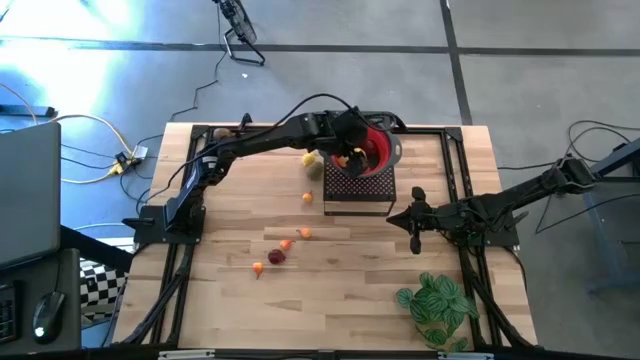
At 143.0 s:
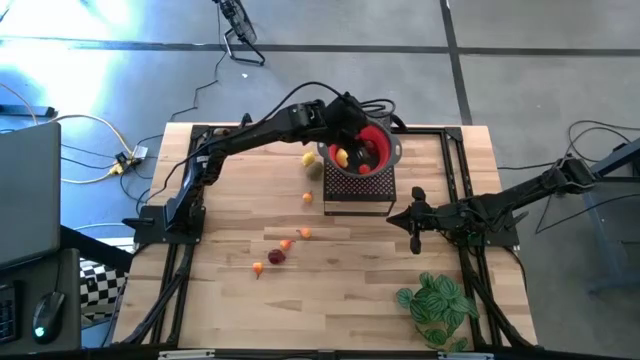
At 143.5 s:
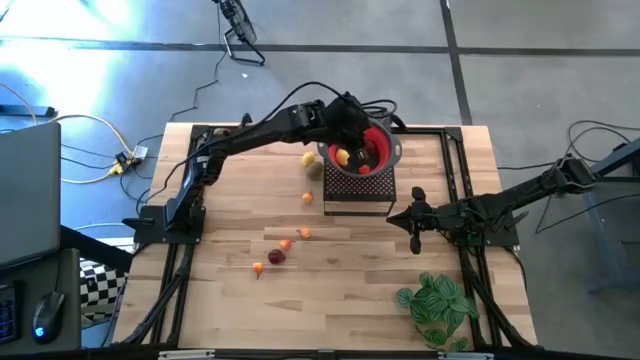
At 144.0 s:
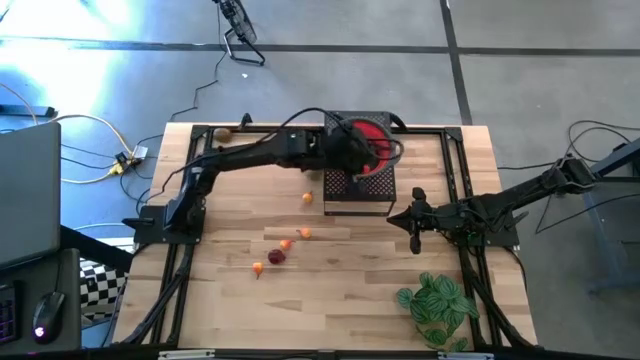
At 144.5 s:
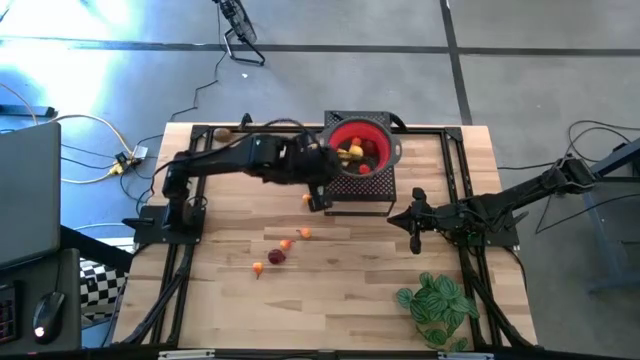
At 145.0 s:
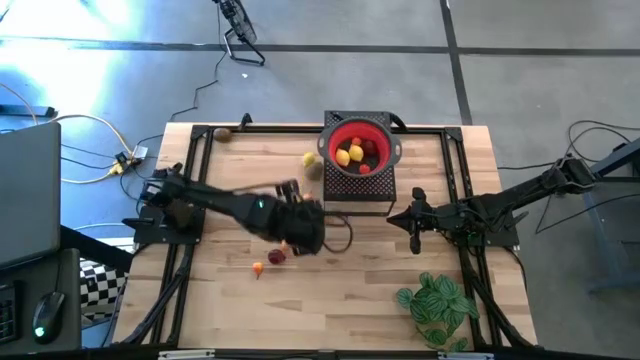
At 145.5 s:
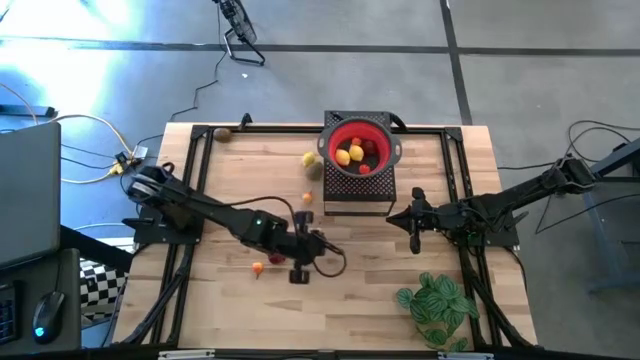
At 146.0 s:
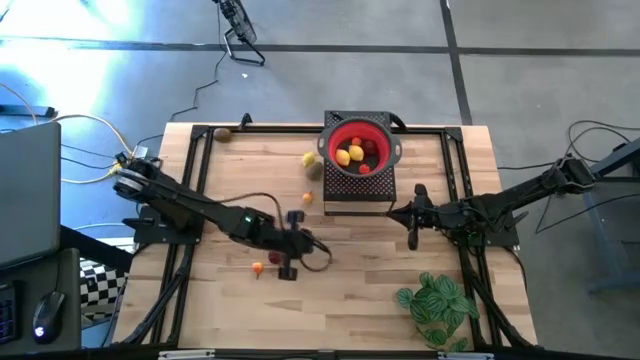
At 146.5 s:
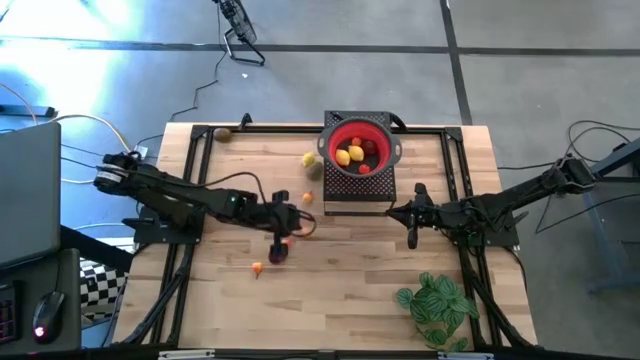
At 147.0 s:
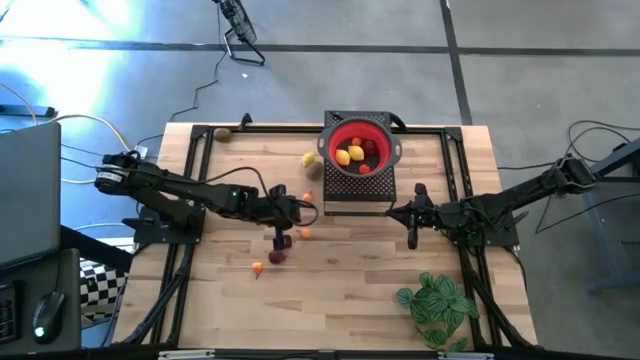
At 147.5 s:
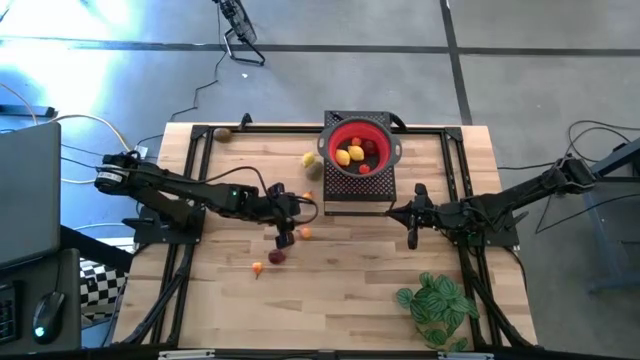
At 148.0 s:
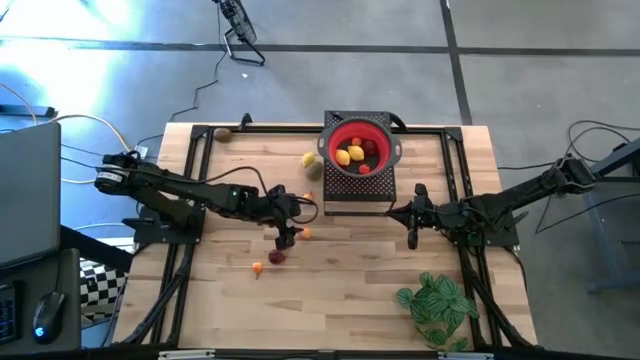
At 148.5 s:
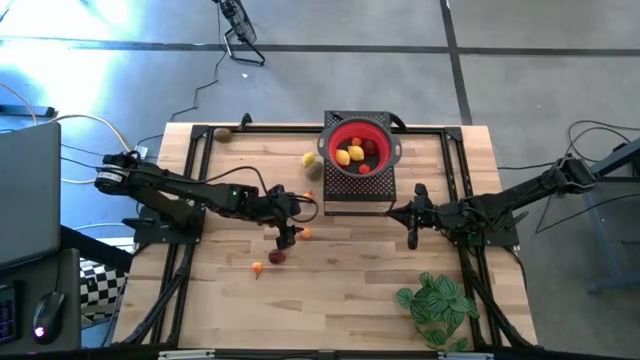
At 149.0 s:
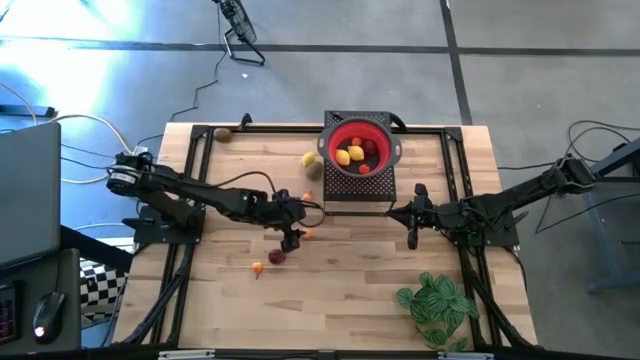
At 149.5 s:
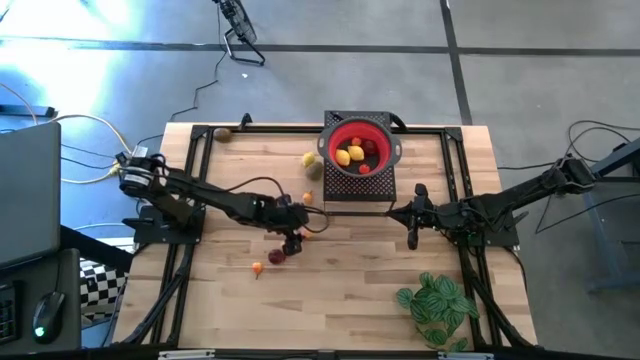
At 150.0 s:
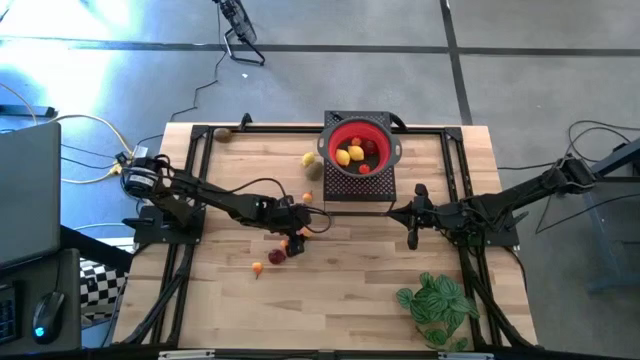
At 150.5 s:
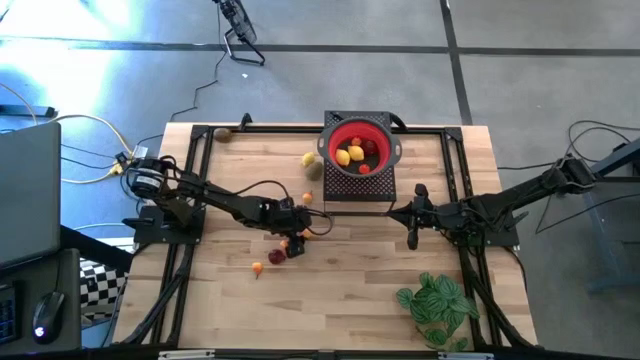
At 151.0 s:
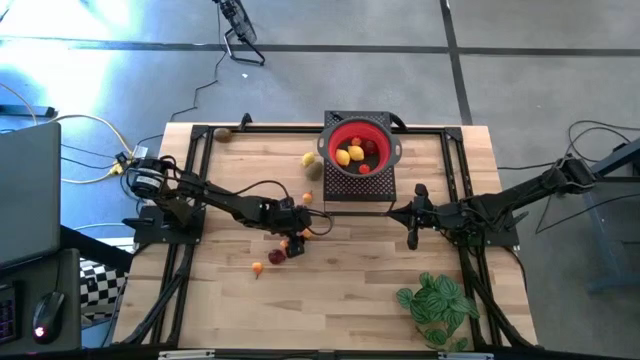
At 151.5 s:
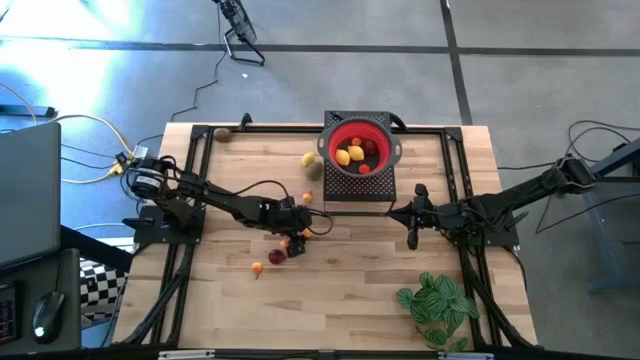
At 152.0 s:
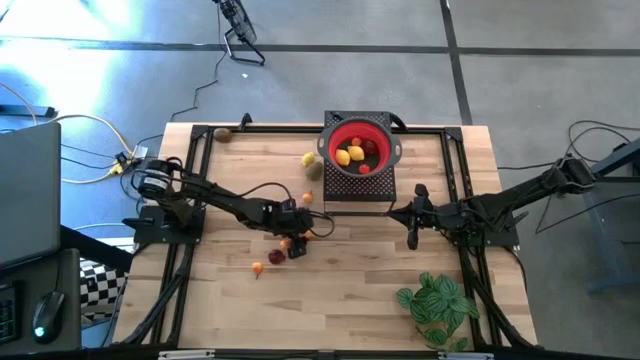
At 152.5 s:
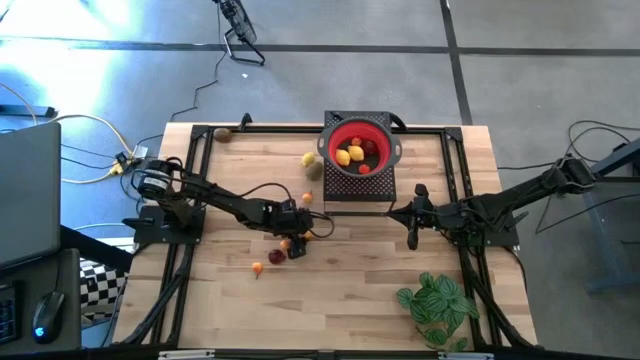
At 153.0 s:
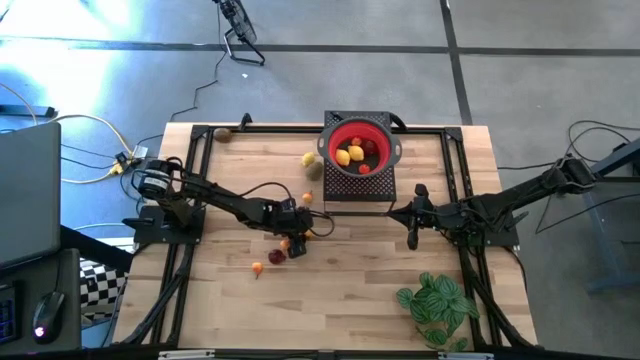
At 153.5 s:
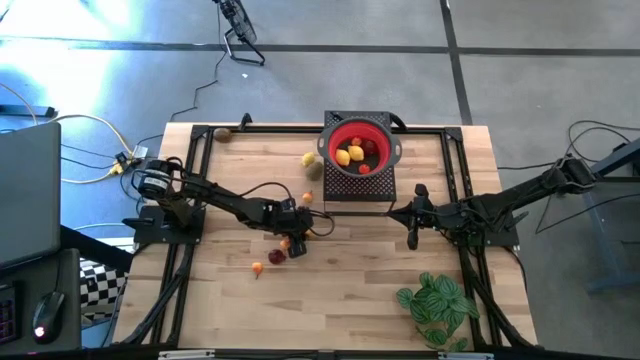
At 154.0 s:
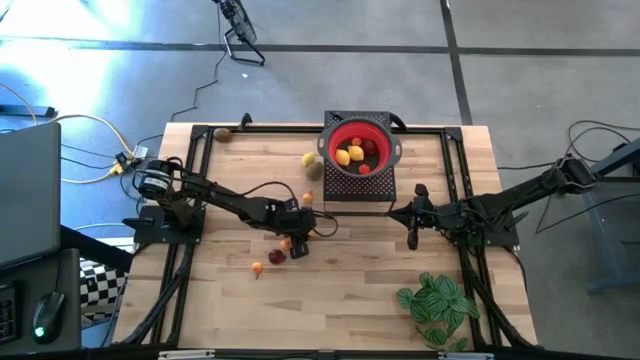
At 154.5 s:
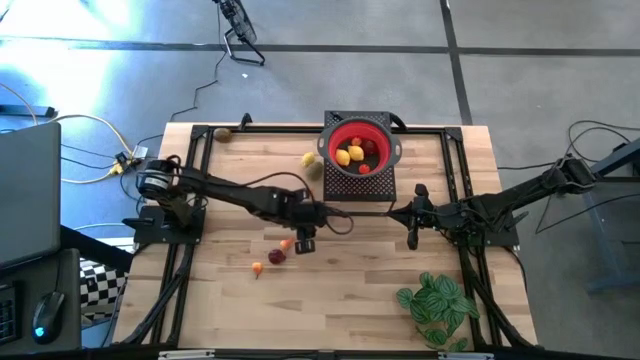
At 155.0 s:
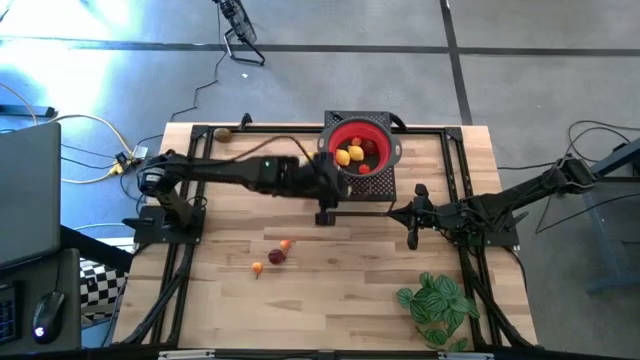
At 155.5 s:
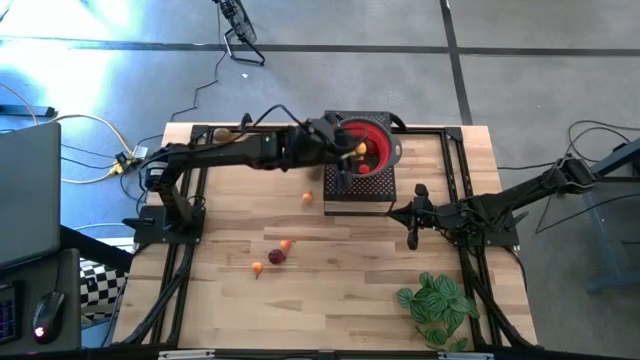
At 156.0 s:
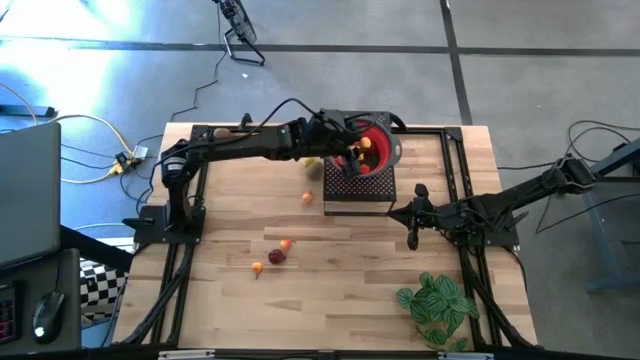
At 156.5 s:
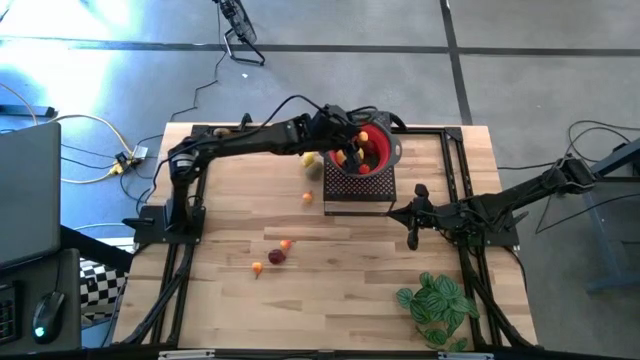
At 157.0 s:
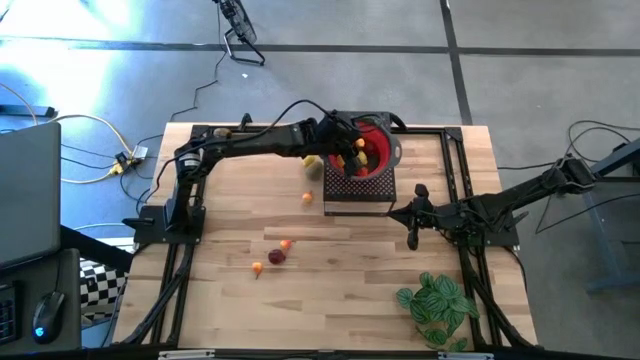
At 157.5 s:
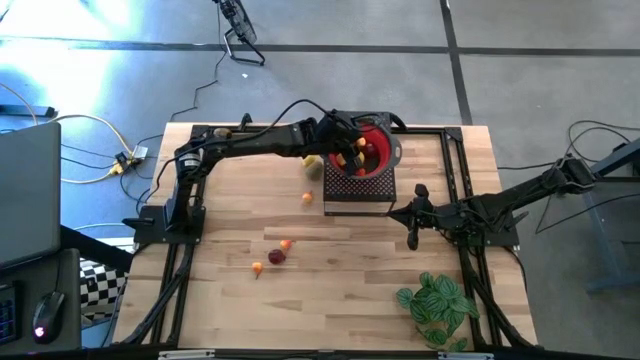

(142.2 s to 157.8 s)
Task: Pick & Place Fruit
Put the orange pear into the red strainer bowl on the shelf

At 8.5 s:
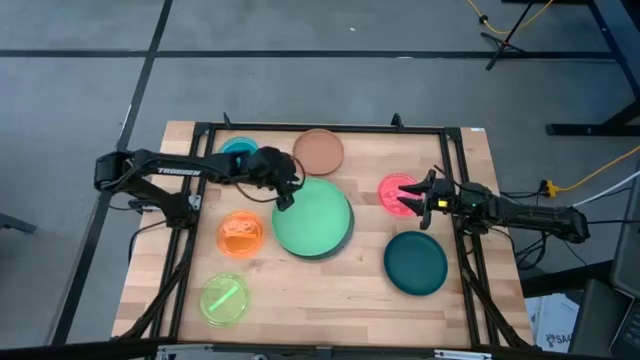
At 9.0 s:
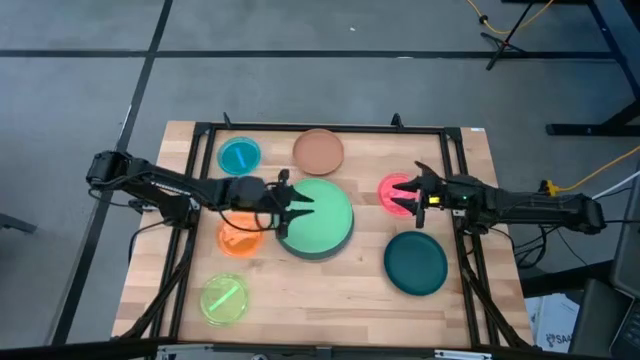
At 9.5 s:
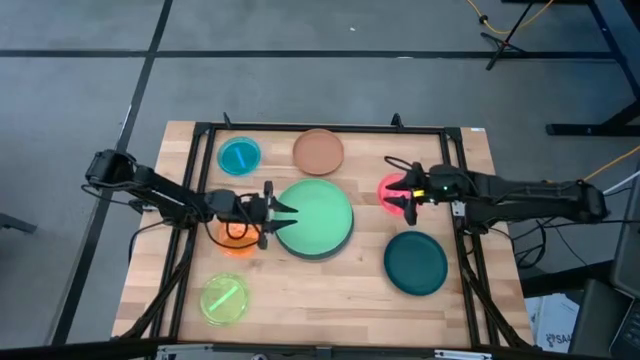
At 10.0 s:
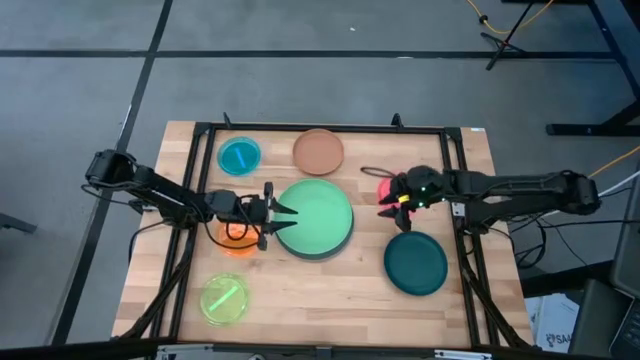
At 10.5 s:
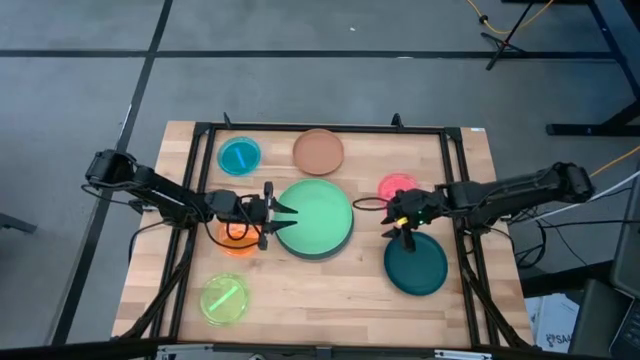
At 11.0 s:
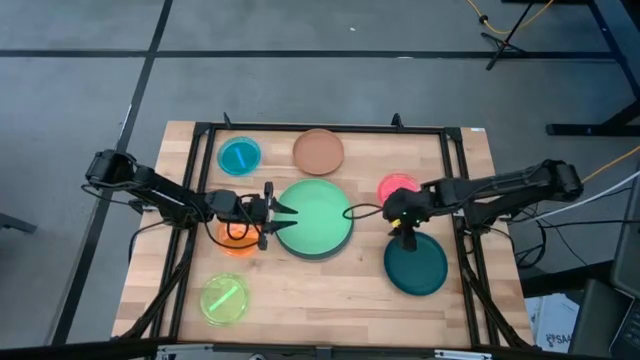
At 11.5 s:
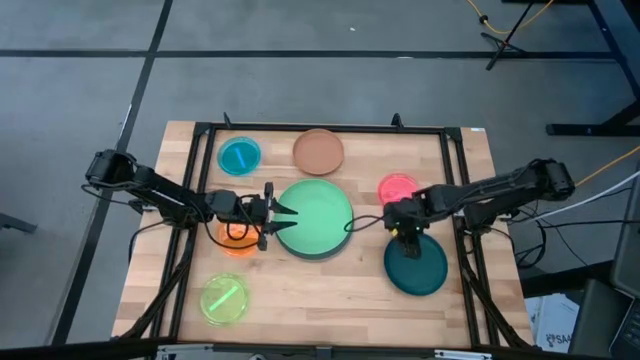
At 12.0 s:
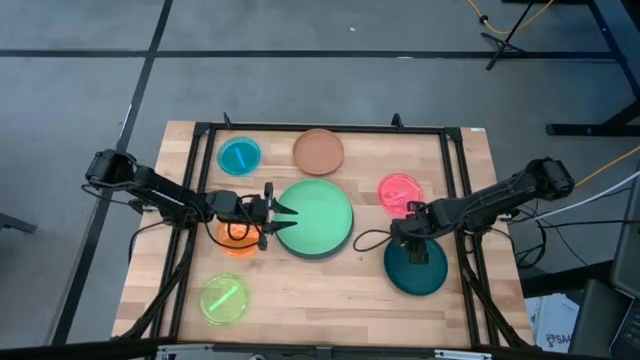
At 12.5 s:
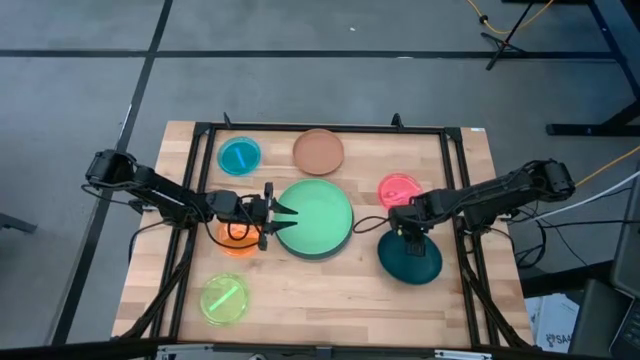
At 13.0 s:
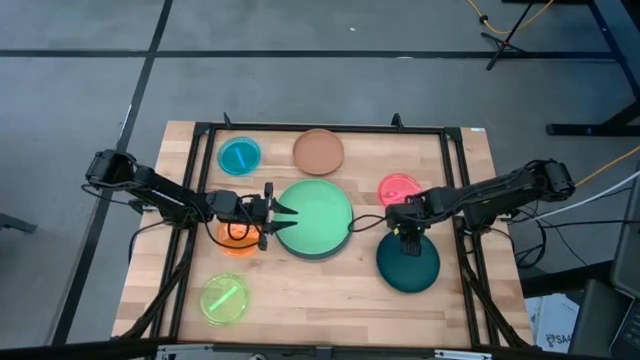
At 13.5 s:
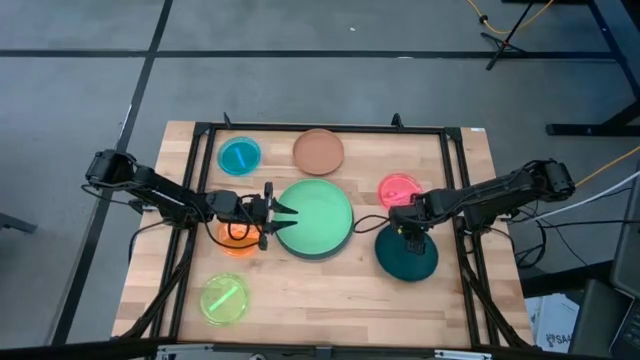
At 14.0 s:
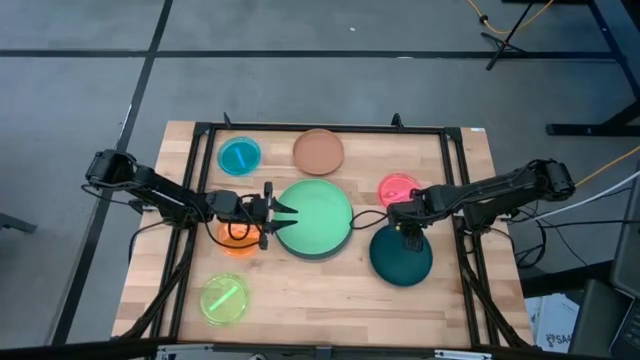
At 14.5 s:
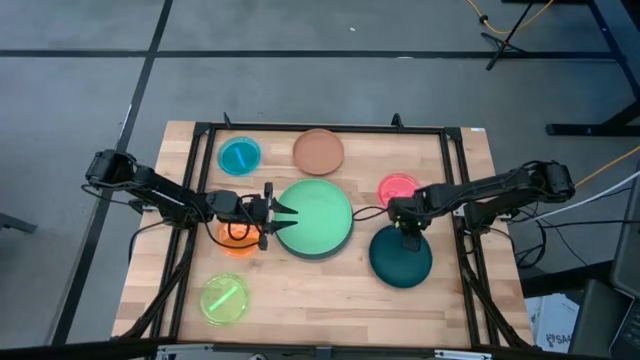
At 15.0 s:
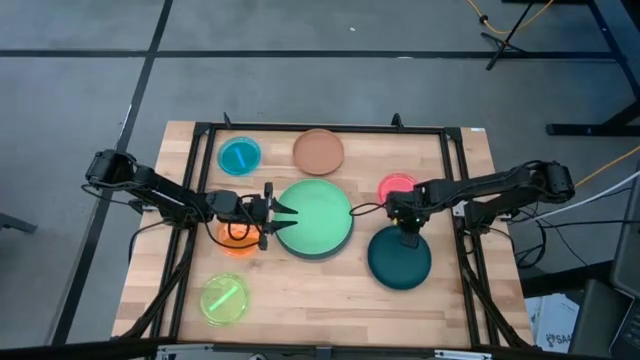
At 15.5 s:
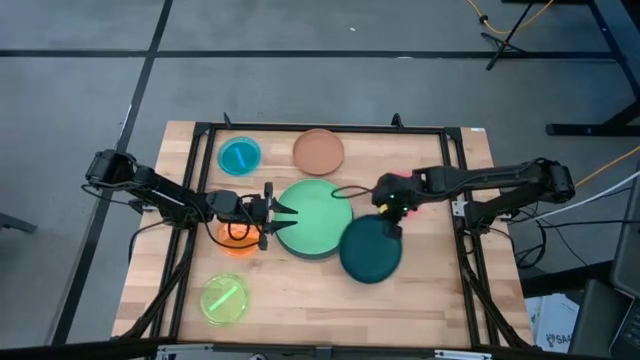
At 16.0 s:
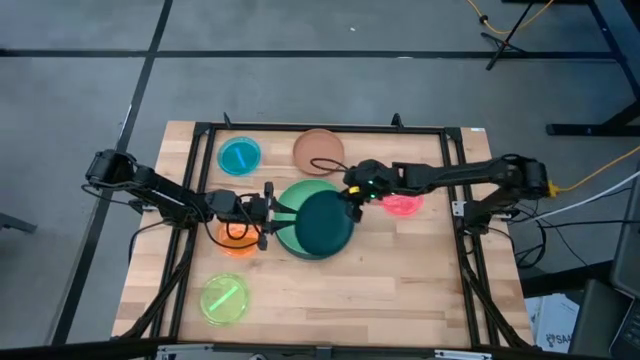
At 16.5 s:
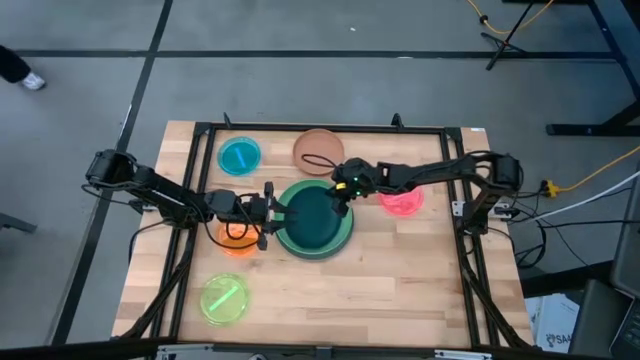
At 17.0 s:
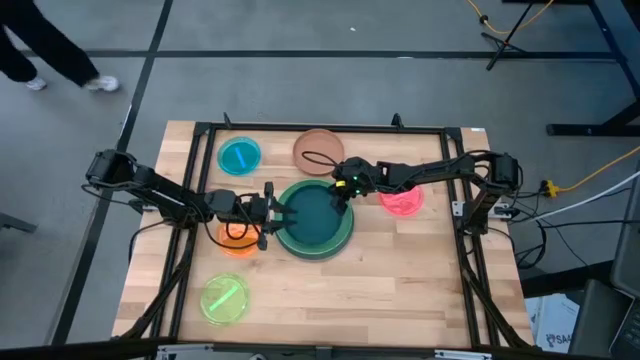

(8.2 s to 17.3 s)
Task: Stack plastic plates
Stack the dark green plate on top of the green plate
